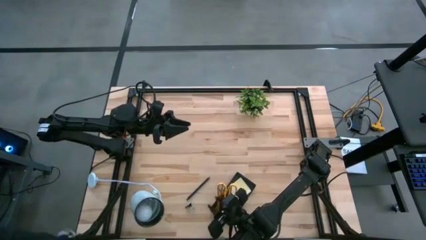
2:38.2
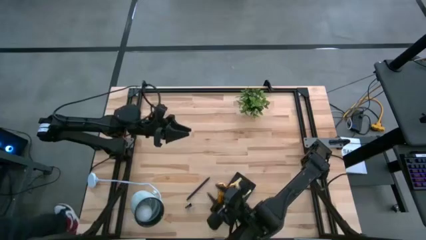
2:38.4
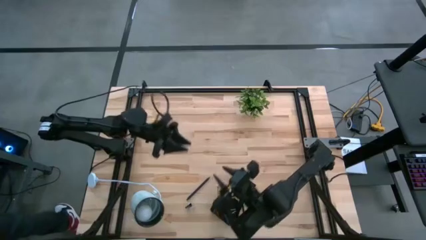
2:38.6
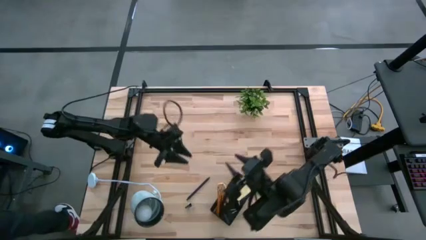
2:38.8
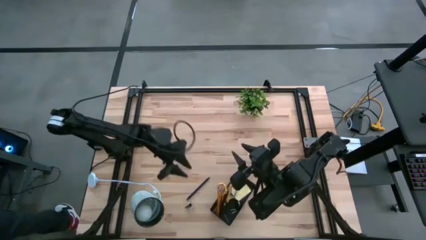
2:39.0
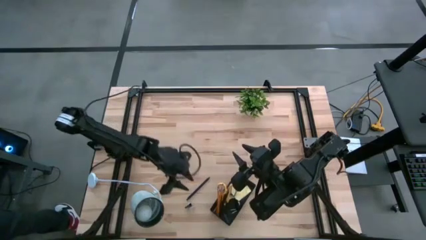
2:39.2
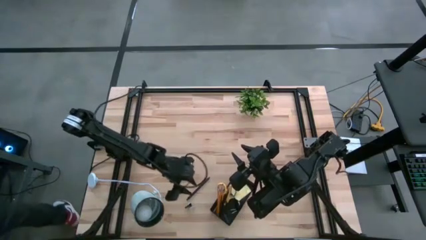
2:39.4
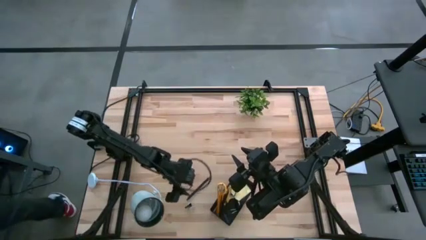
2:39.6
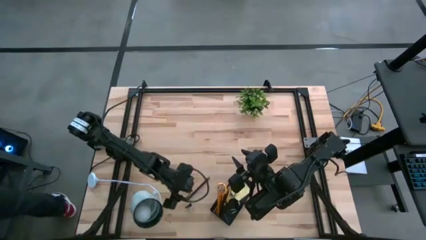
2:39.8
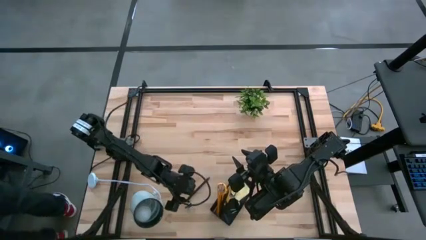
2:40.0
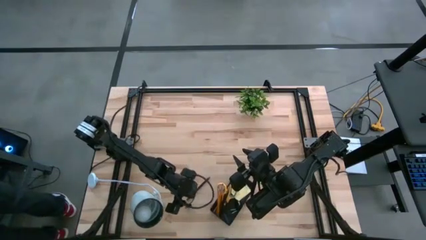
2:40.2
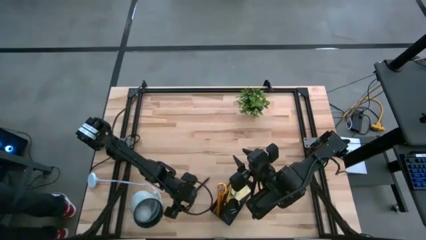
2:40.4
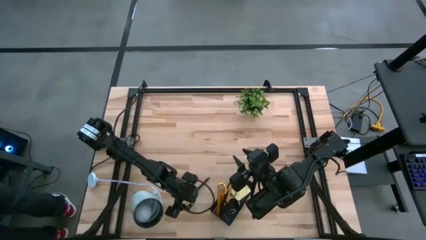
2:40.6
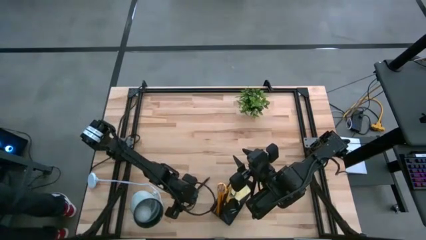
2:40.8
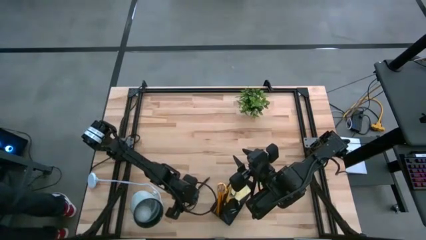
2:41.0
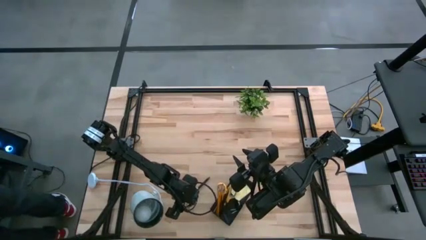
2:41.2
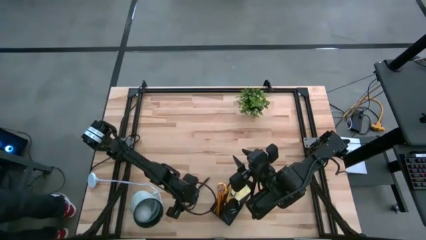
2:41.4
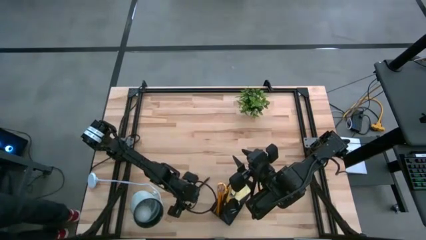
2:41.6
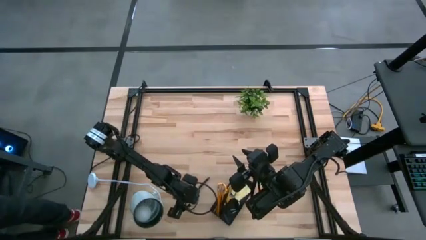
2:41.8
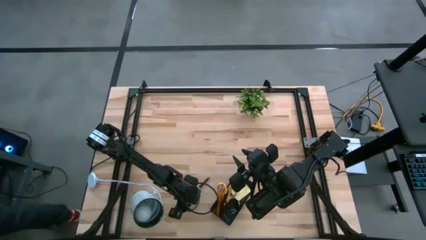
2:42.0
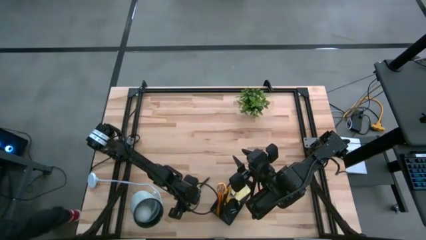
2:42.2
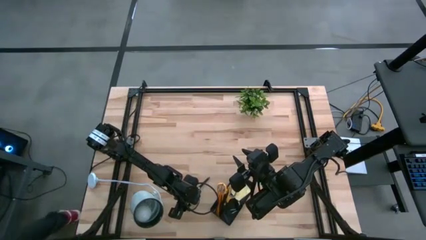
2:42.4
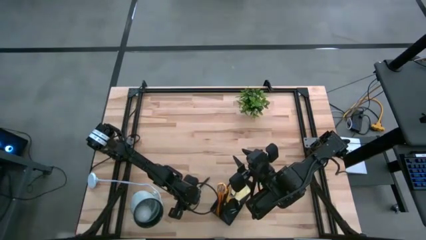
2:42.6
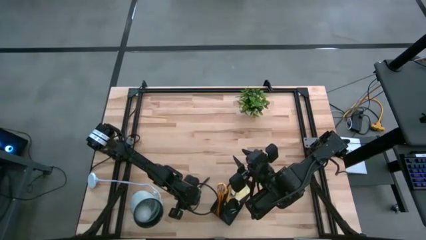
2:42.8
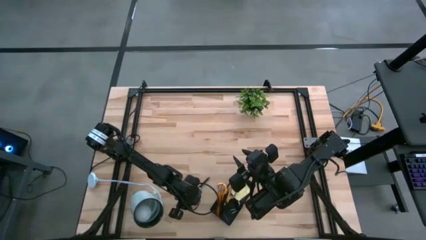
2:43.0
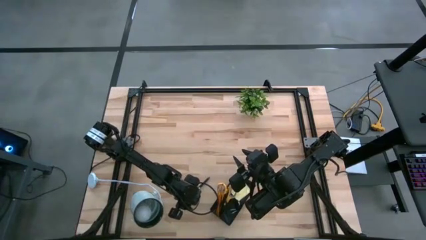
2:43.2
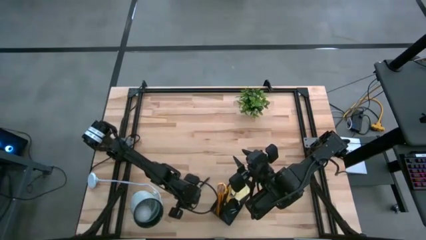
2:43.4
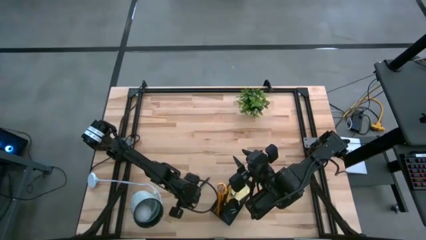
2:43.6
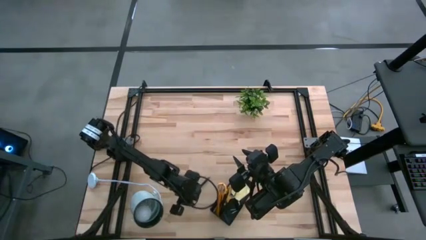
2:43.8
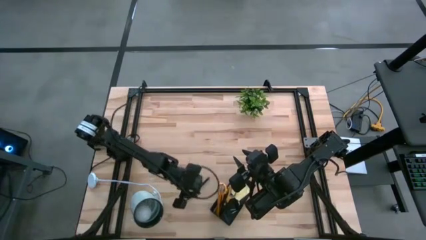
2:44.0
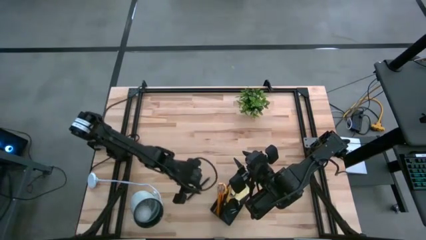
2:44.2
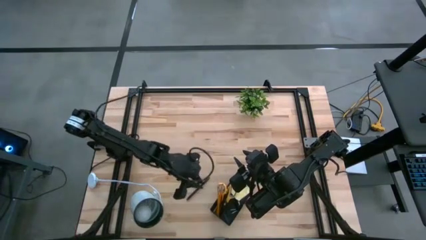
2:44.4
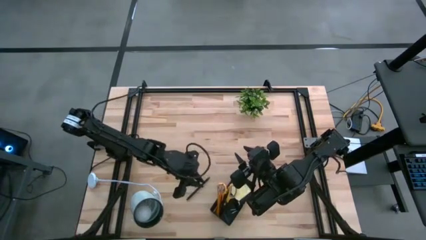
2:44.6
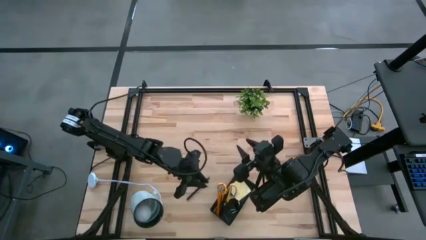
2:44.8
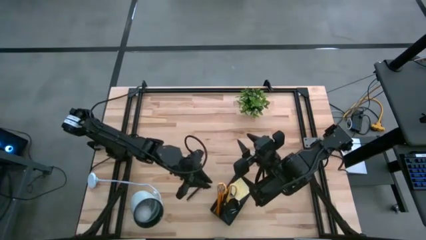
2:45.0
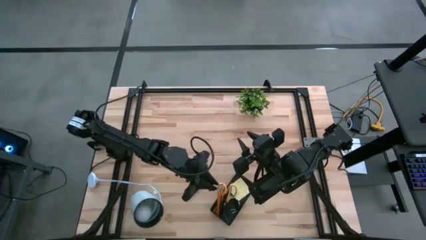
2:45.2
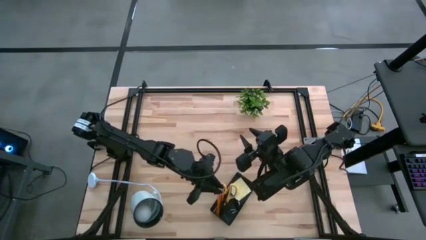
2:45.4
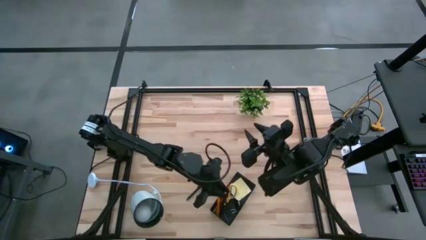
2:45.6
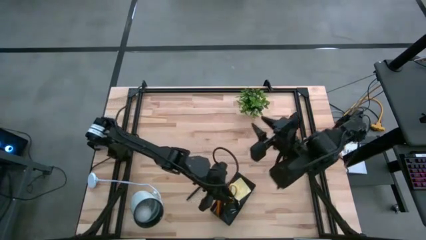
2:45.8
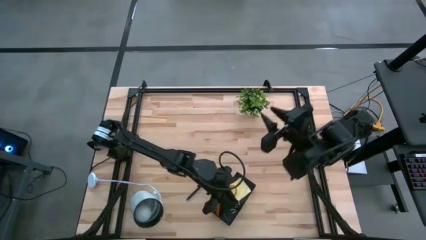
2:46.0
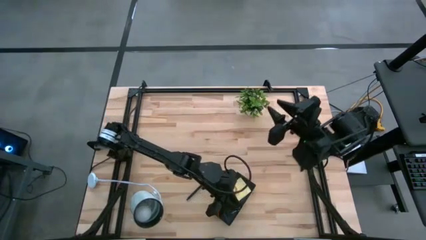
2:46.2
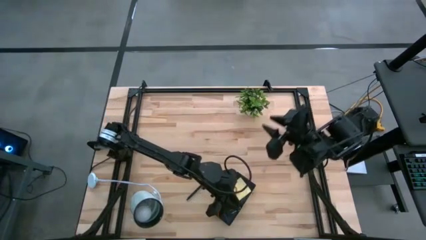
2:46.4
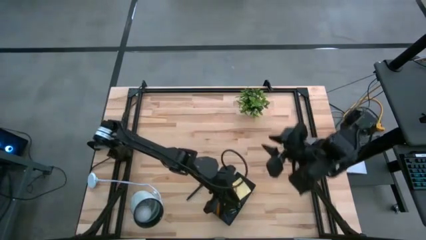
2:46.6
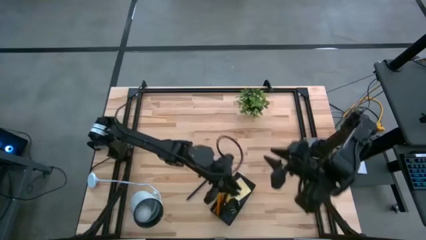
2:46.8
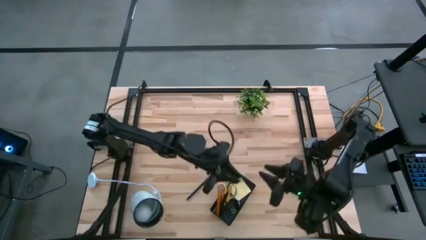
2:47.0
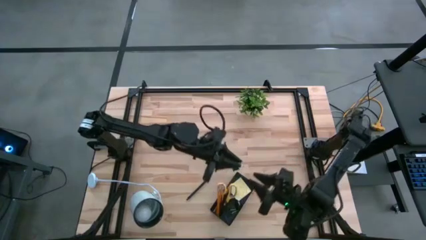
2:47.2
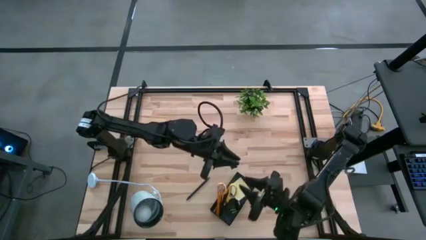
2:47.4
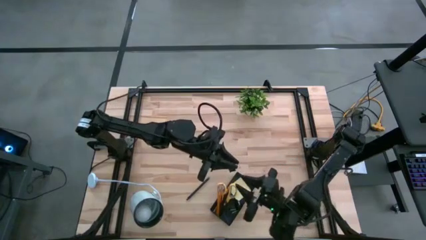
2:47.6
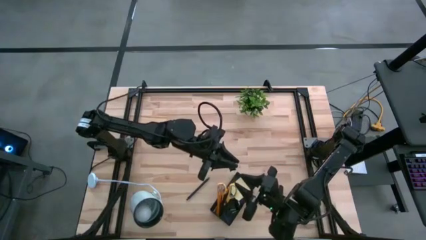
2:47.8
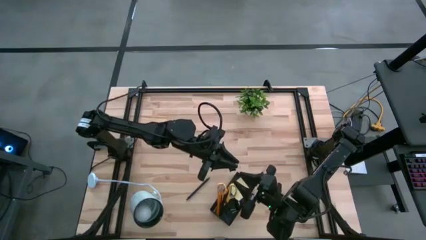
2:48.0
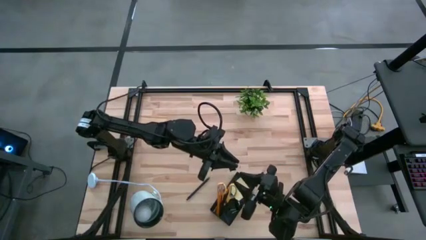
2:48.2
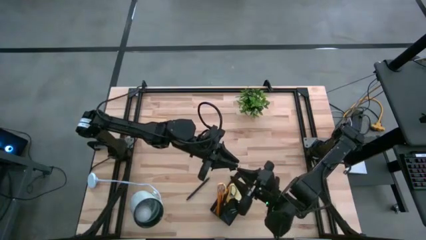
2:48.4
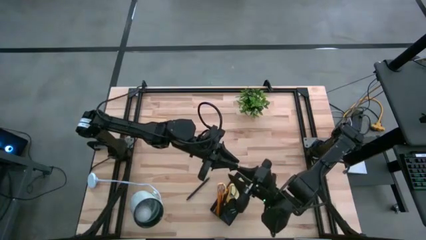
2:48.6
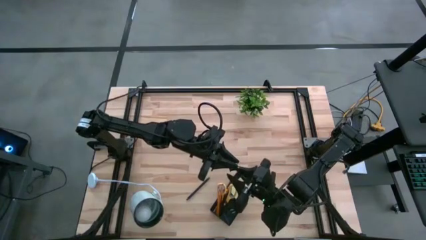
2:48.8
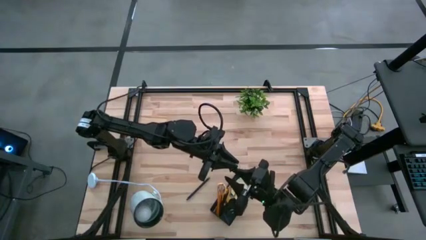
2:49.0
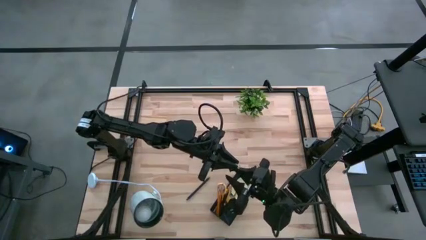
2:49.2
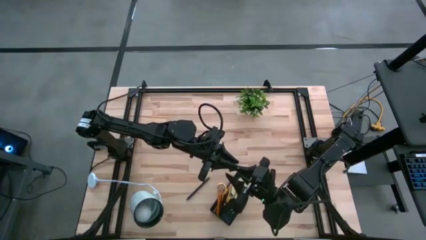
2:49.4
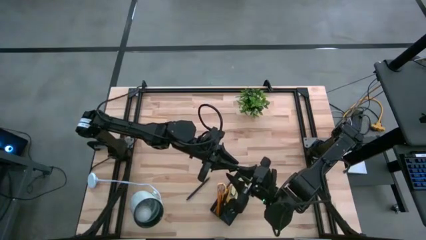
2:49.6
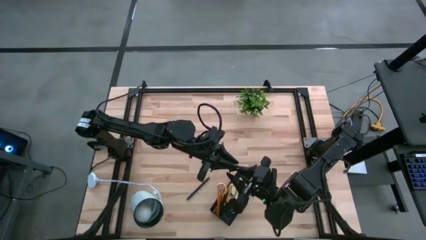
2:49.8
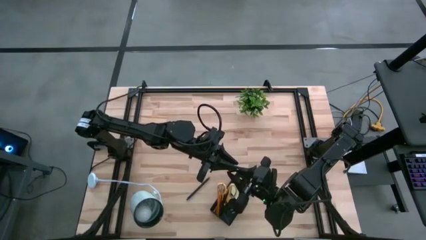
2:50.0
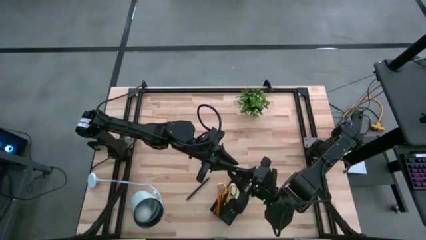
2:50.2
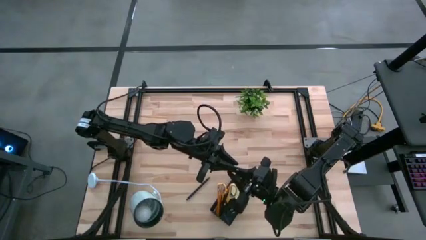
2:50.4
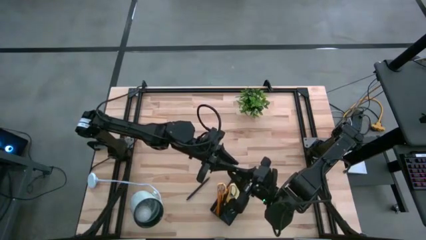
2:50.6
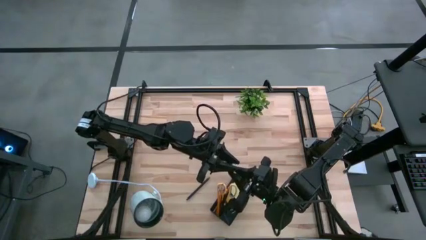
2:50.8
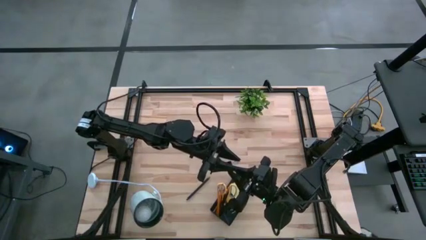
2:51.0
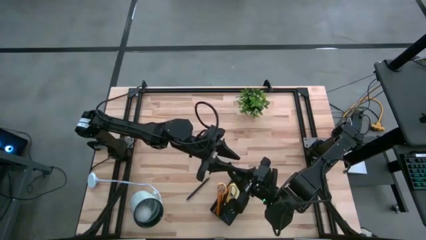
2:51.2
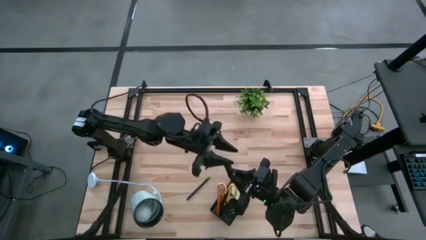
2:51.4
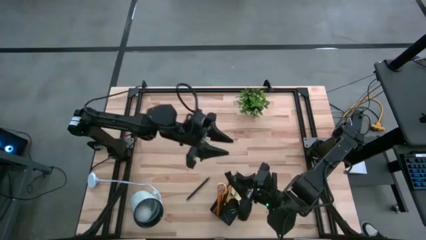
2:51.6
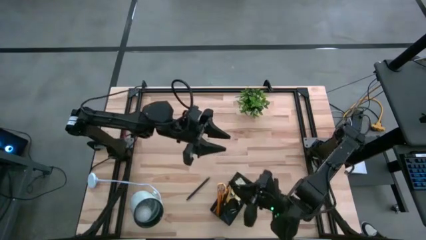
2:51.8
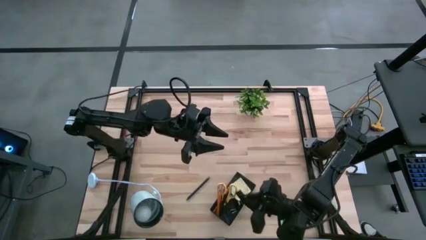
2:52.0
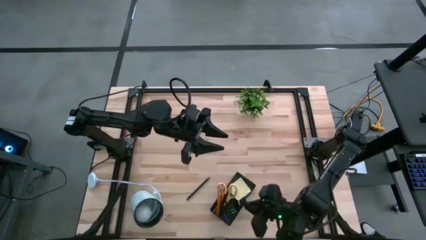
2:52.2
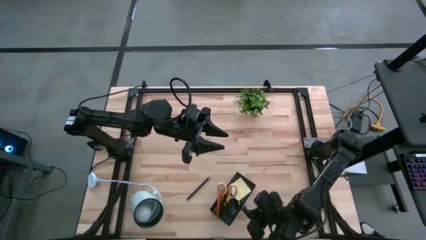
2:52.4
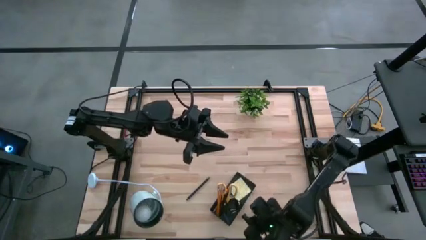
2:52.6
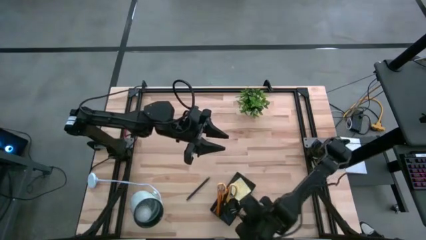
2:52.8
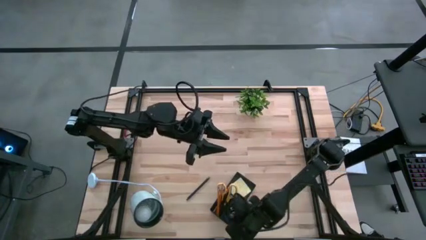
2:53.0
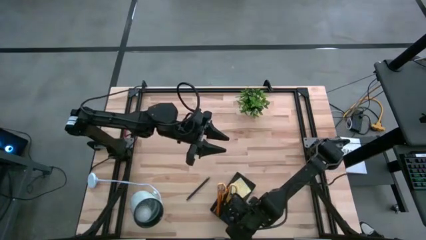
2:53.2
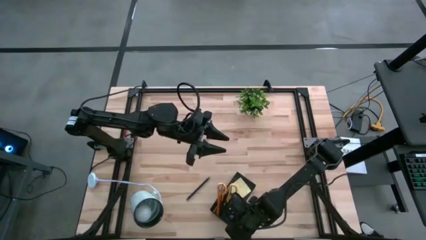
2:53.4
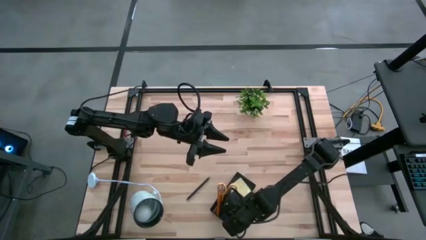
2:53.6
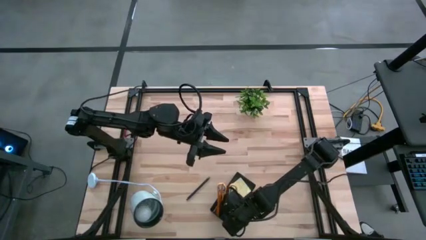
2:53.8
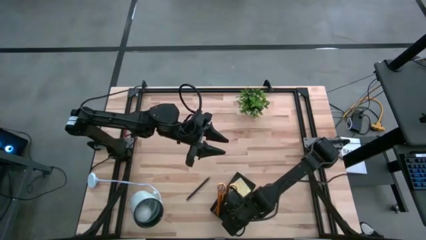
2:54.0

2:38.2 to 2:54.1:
Task: Pick and place office supplies into organizer
Put the binder clip into the desk organizer

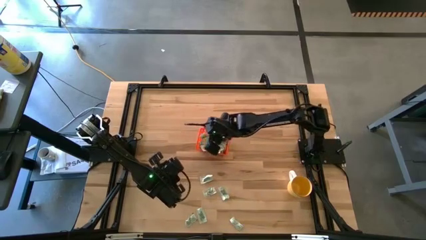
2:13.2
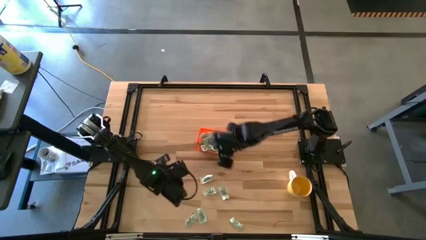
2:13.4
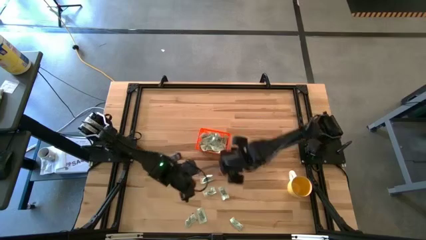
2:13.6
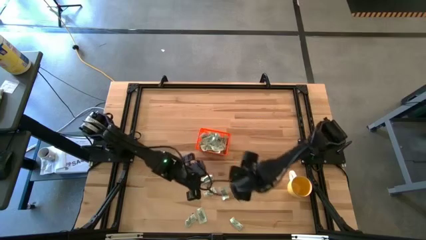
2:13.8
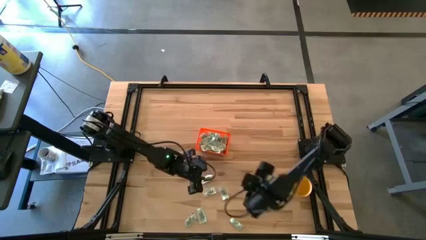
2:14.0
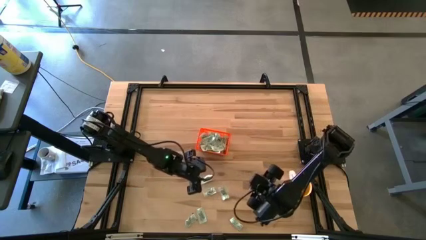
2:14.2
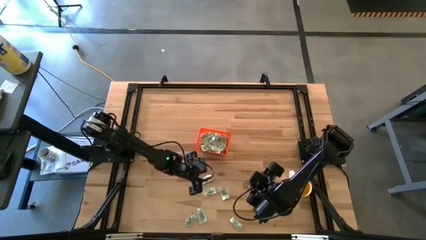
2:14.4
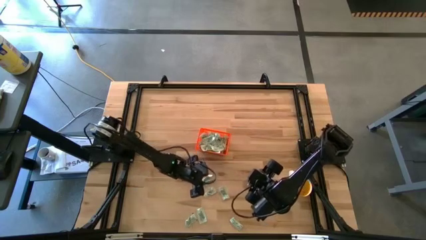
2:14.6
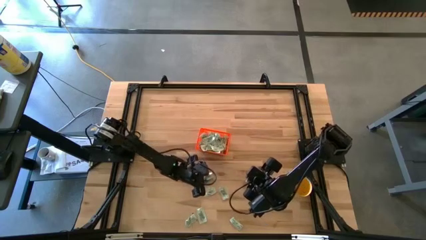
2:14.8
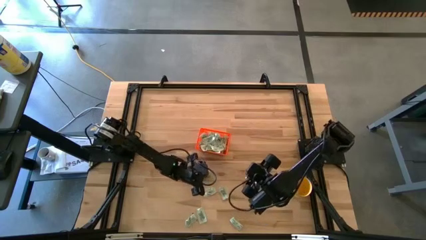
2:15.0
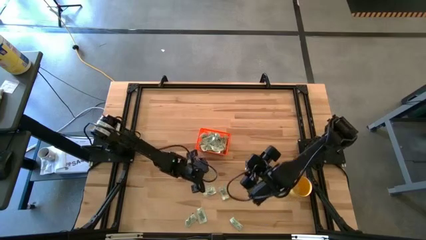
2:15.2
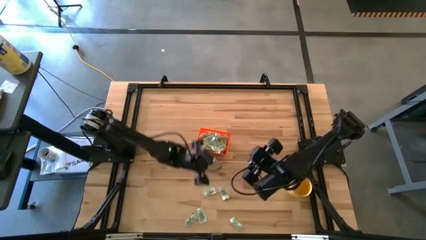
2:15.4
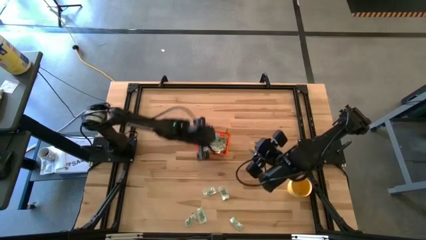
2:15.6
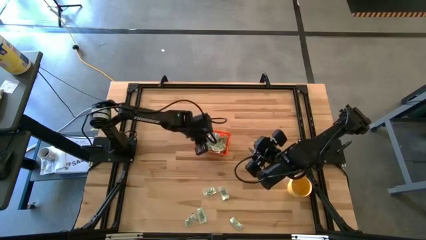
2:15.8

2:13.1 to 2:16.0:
Task: Pick and place Stevia / Truvia into bins
Put the light green stevia packet into the orange bin
